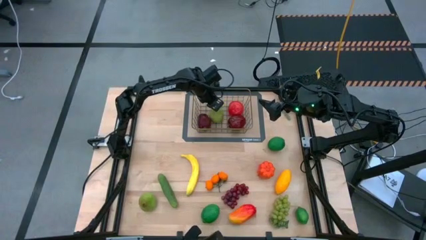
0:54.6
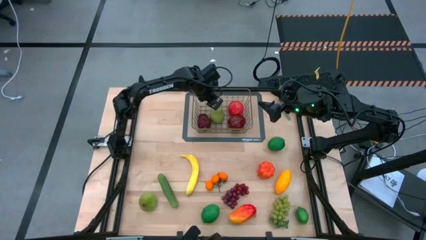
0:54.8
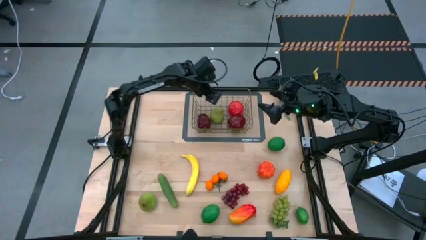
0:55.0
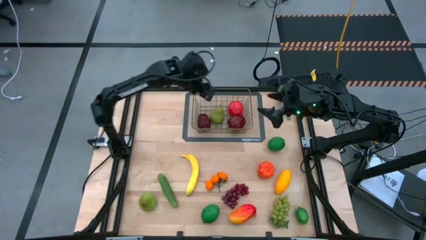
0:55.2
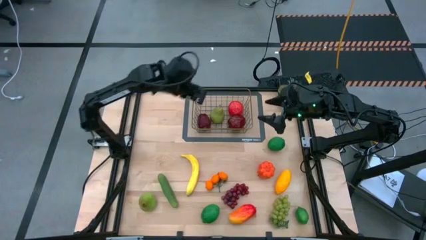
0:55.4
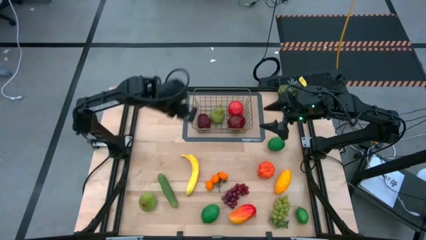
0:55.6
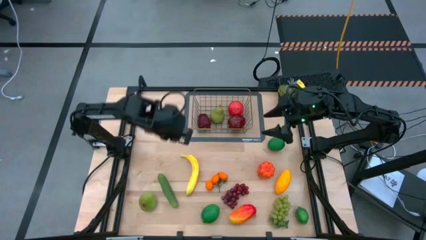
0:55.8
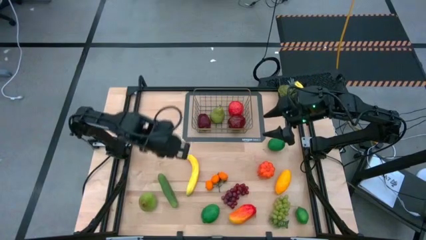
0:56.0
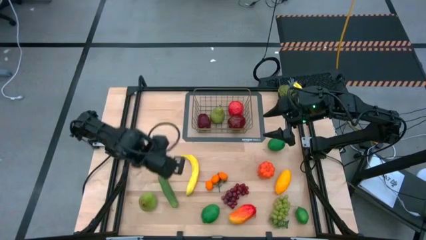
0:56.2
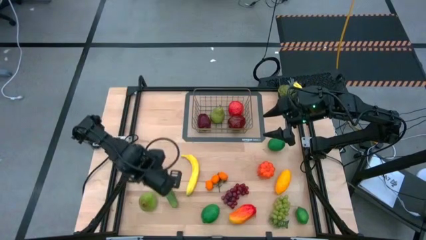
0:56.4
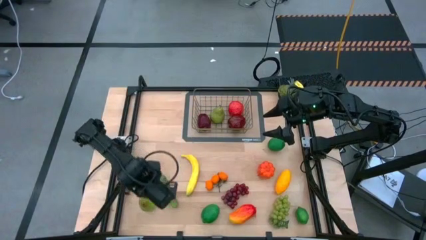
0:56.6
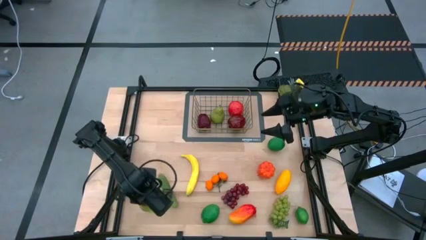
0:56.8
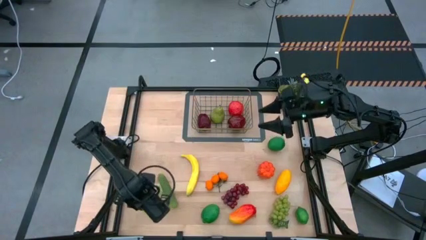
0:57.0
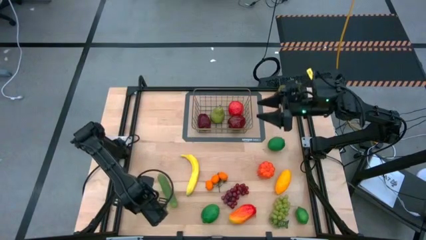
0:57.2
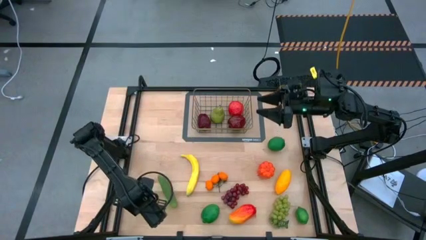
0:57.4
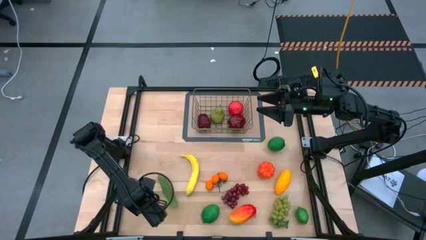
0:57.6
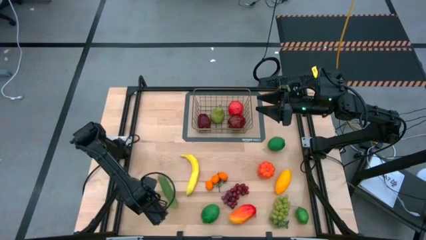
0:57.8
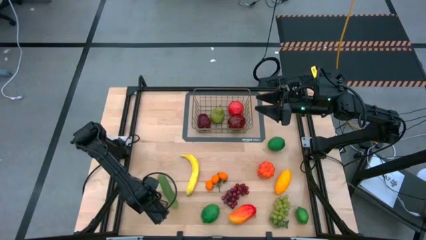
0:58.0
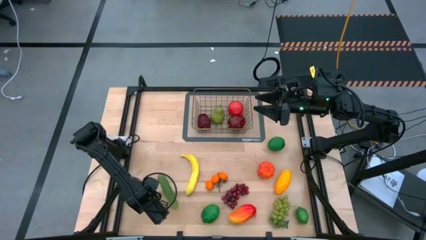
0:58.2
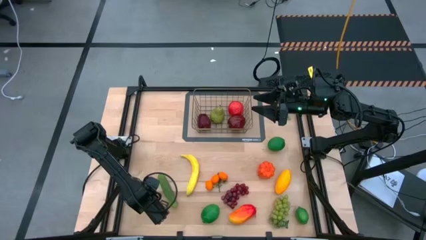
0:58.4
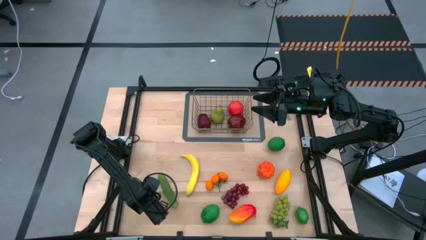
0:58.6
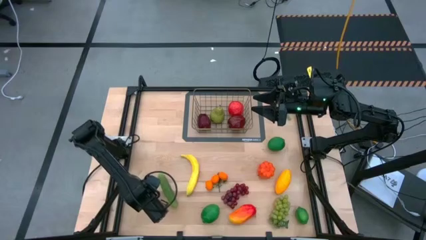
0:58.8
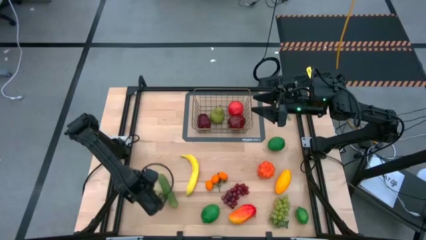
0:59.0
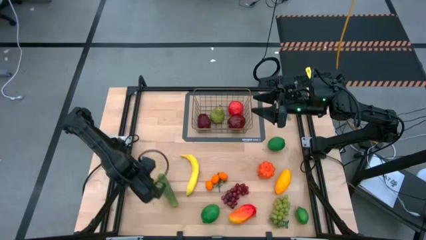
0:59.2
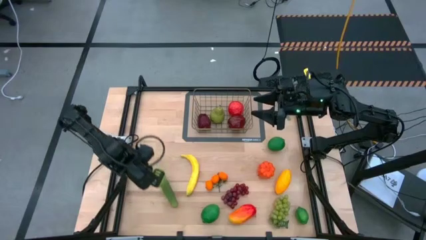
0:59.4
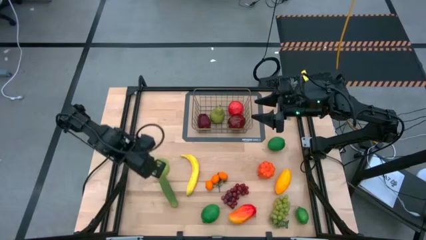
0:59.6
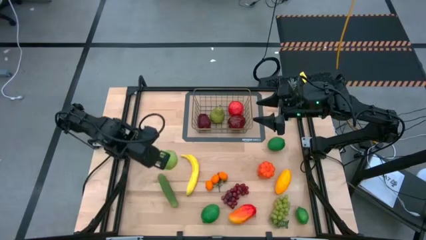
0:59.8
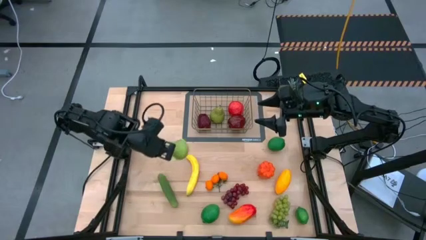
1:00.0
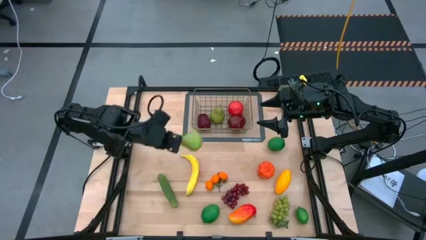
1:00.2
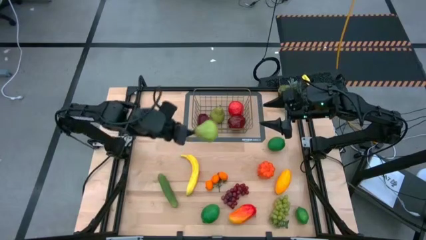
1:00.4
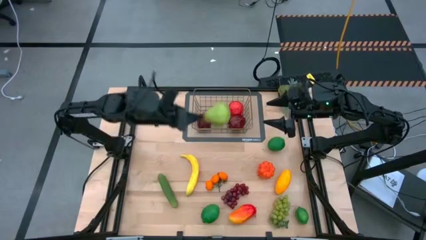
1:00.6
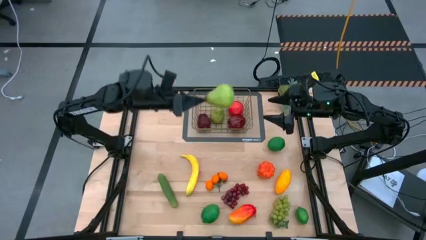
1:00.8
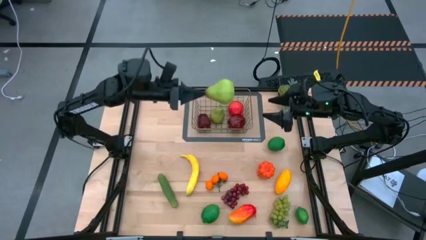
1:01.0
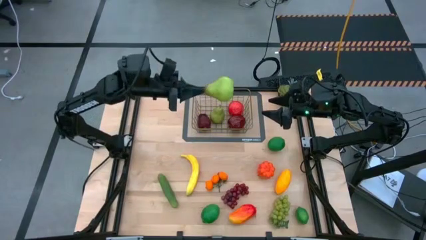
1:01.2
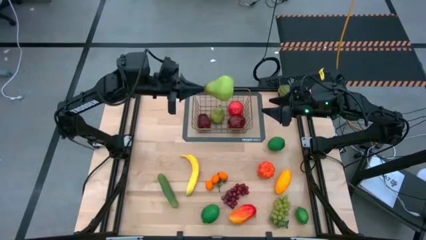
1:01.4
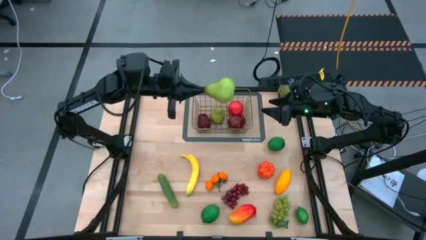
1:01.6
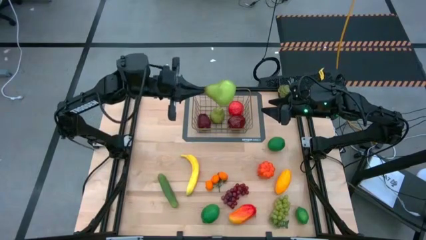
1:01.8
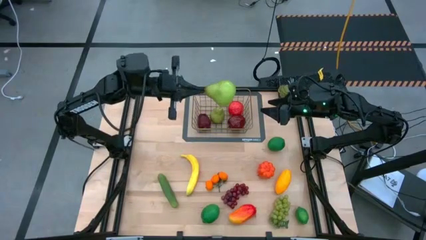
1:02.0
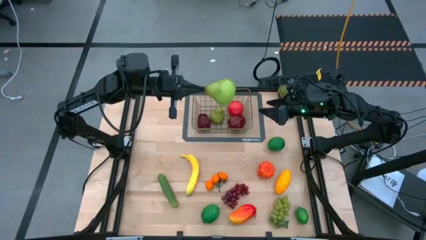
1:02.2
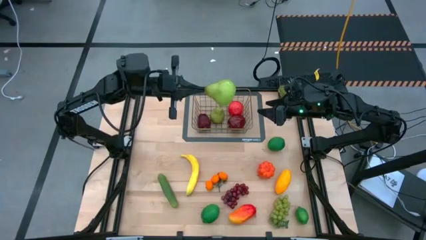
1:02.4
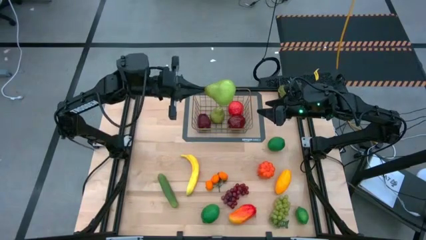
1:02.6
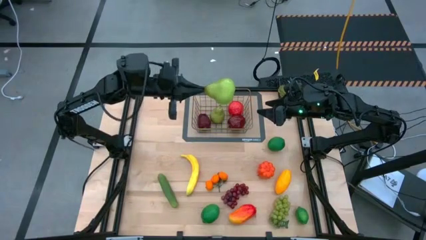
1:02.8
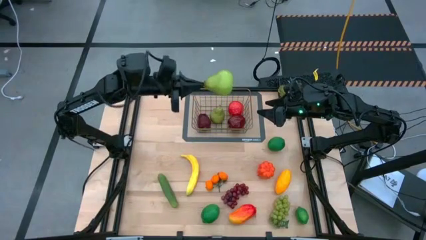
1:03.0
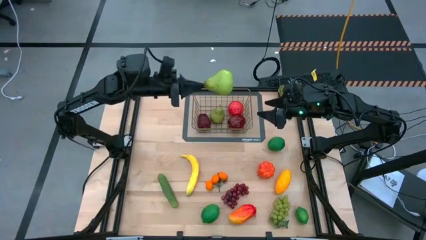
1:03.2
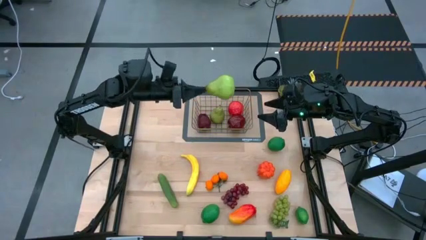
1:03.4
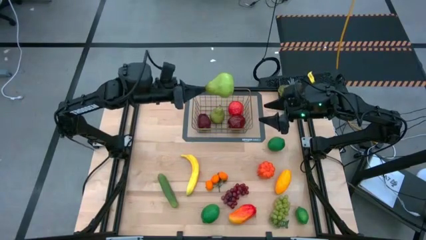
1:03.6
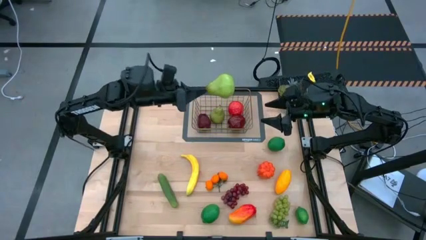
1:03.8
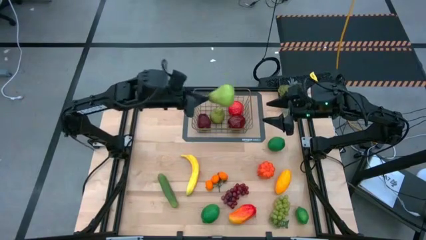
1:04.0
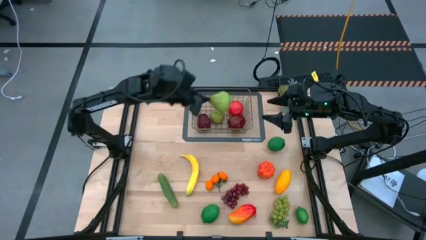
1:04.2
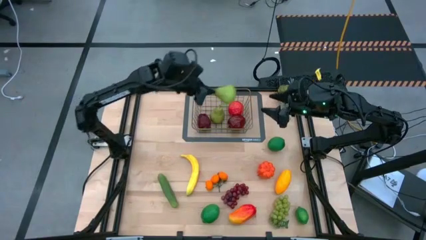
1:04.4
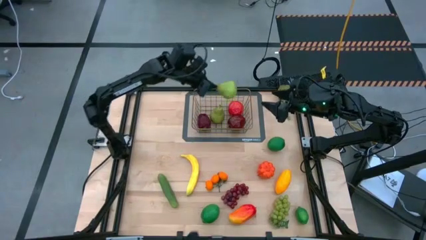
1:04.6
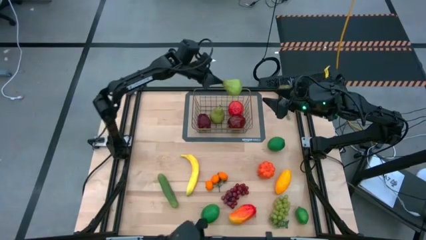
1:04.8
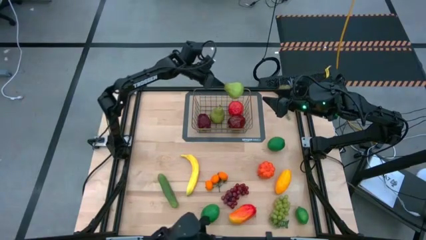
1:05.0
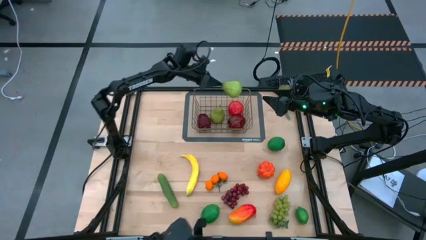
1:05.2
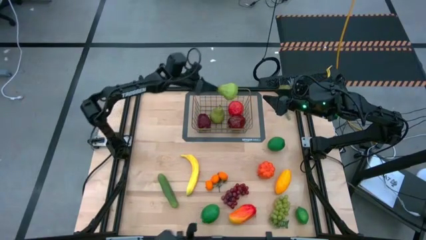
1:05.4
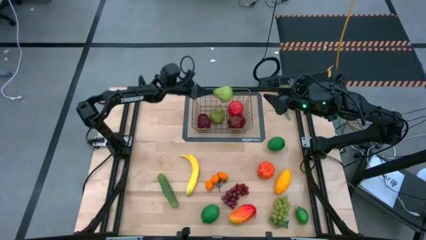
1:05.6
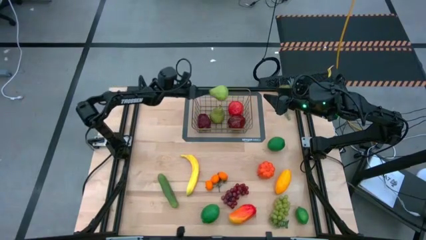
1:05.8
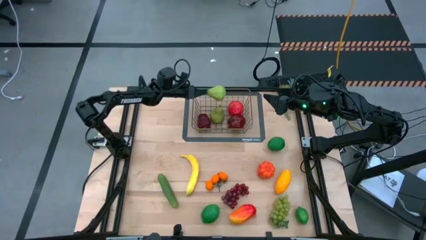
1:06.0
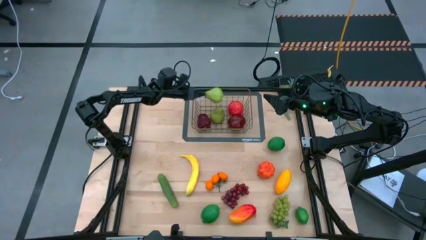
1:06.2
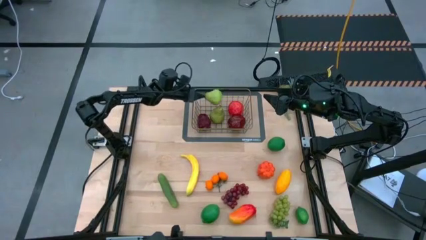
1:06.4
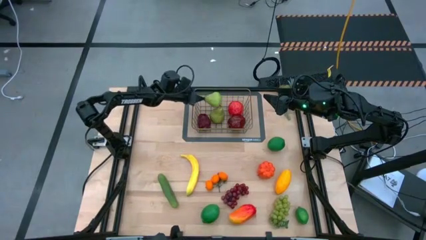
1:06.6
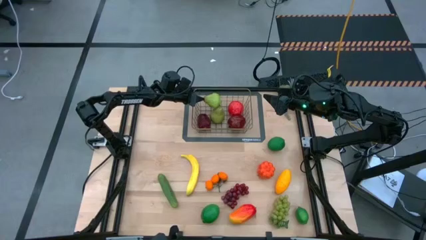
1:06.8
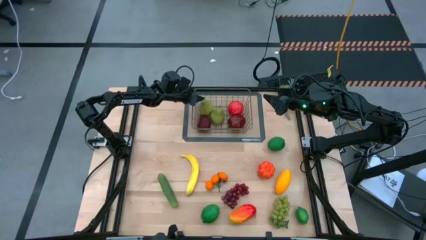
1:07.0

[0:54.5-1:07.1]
Task: Build produce basket
Put the green pear into the brown wire basket

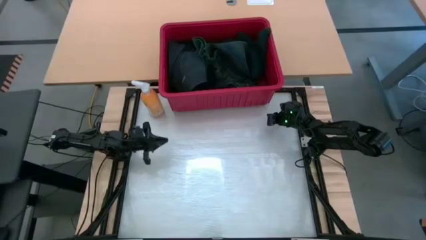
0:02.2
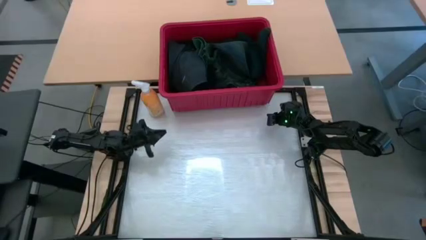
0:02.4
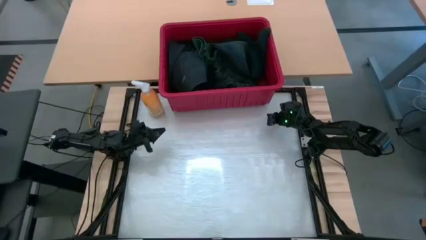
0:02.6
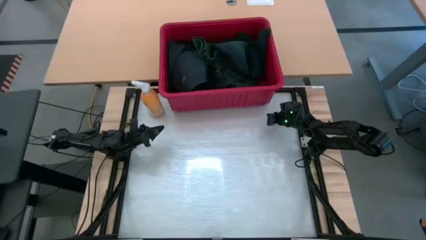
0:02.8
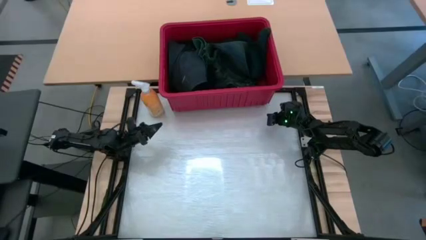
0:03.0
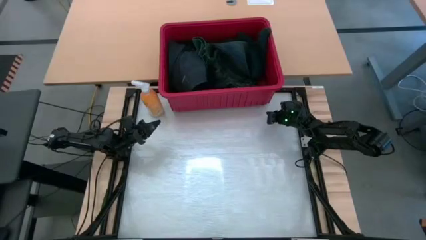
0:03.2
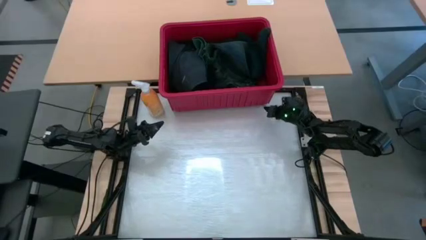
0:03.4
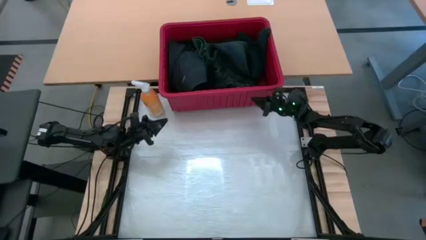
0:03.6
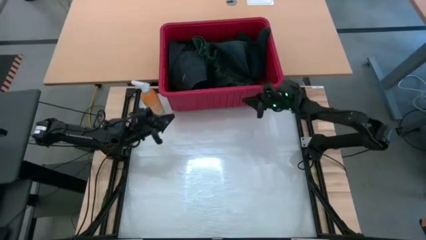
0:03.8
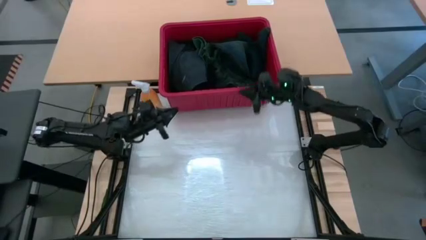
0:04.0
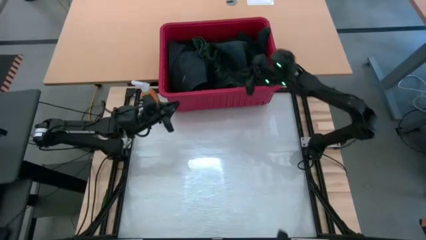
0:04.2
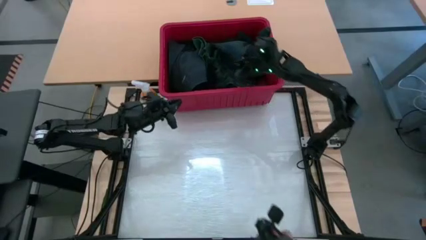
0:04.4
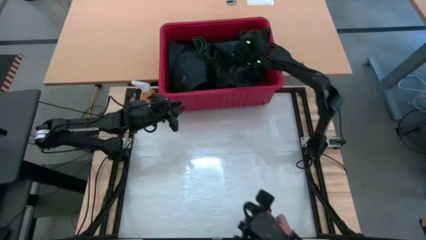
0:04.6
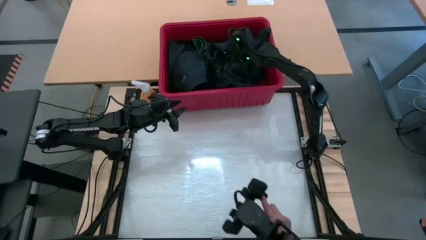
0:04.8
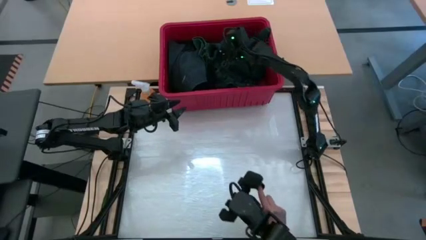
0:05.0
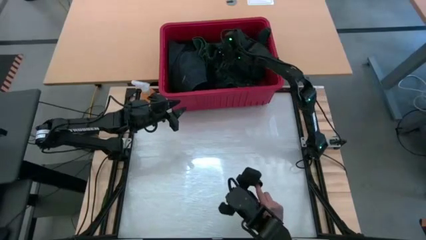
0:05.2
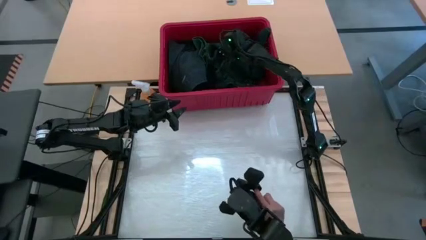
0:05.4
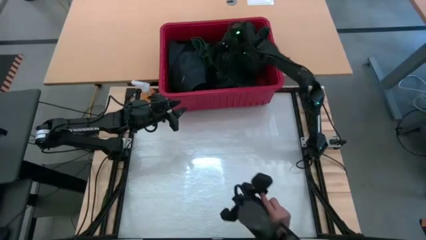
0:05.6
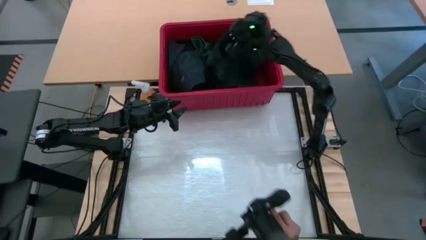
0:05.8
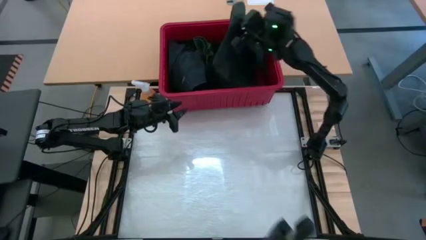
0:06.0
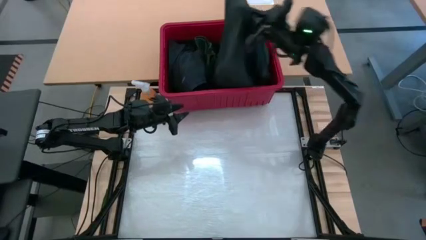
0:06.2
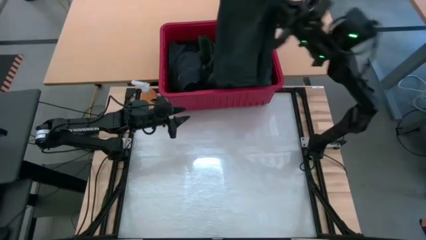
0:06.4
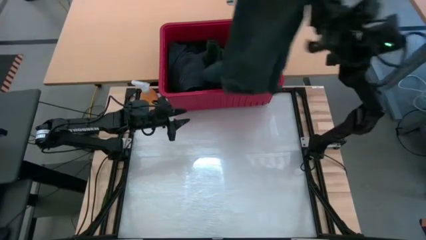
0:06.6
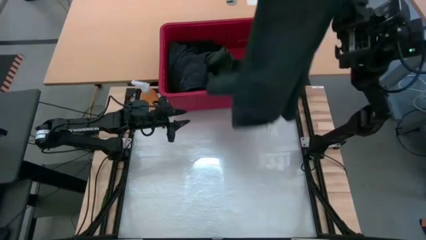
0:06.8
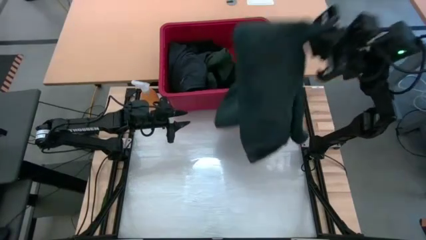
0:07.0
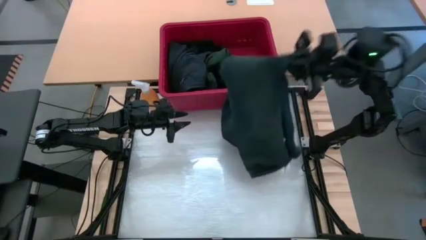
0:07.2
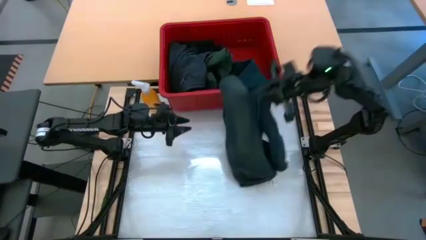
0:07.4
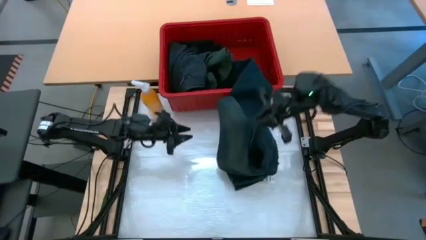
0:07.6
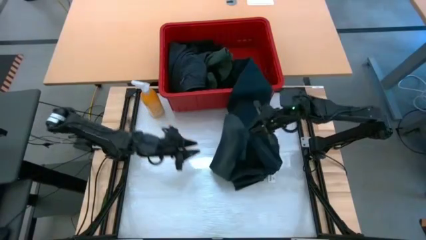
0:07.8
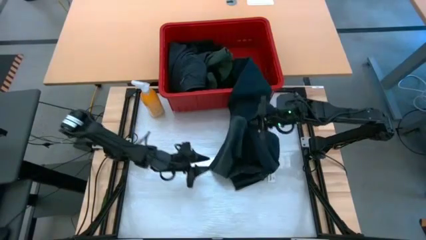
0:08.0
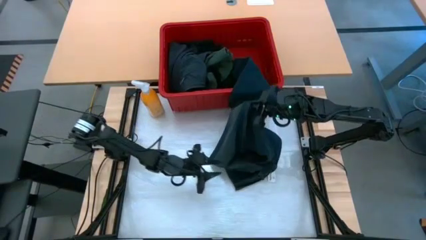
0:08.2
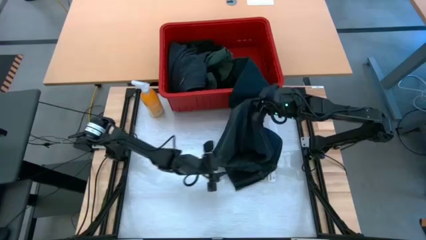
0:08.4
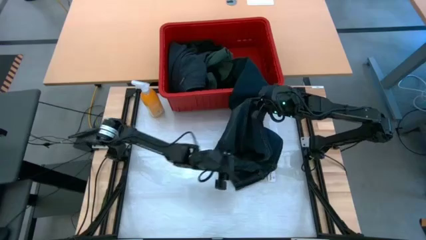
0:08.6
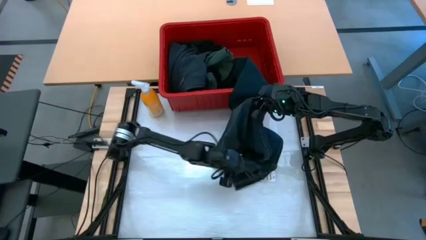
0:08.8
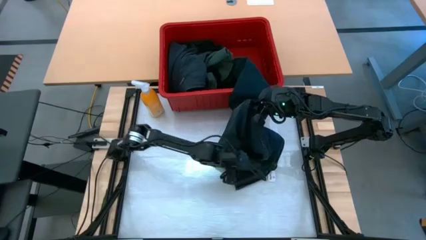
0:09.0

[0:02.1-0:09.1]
Task: Fold Laundry from Bin
Remove the blue pants from the red bin
